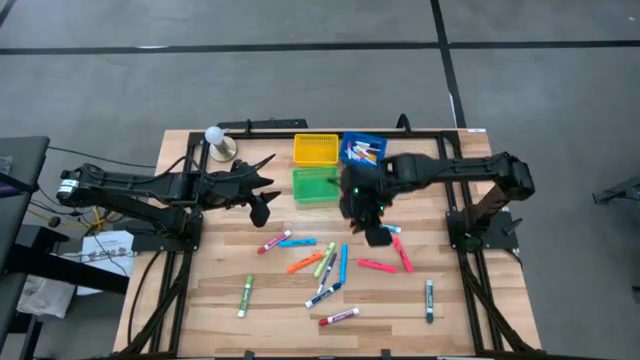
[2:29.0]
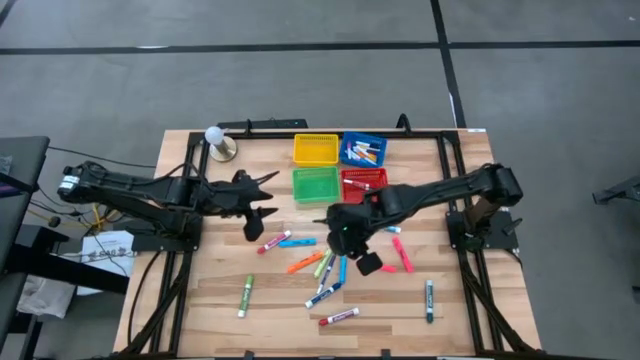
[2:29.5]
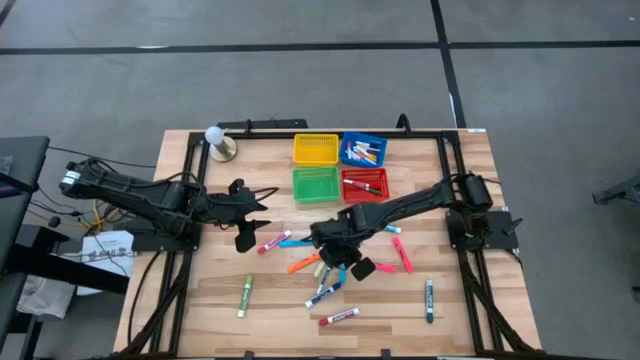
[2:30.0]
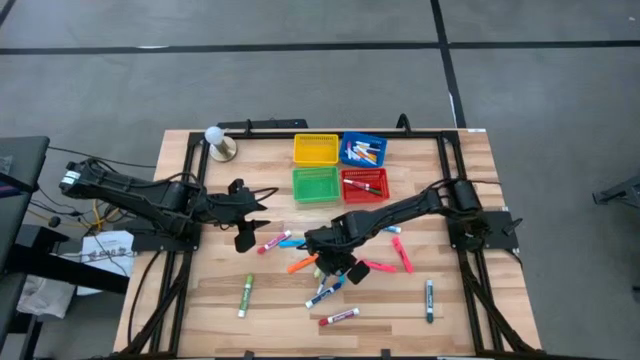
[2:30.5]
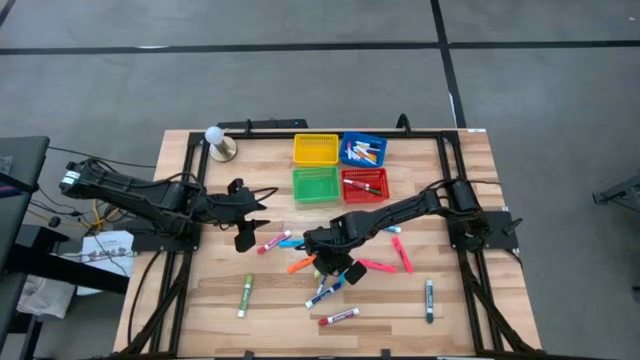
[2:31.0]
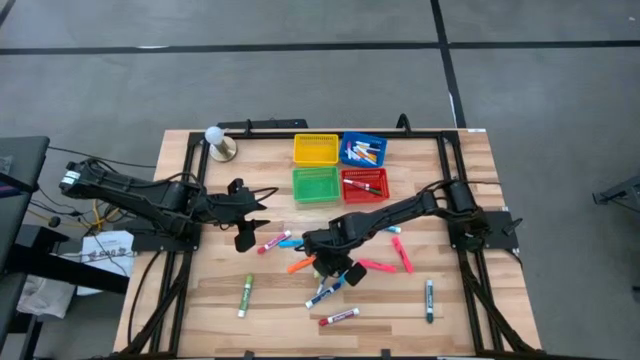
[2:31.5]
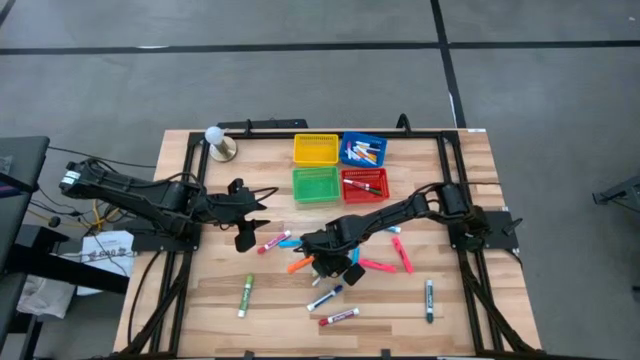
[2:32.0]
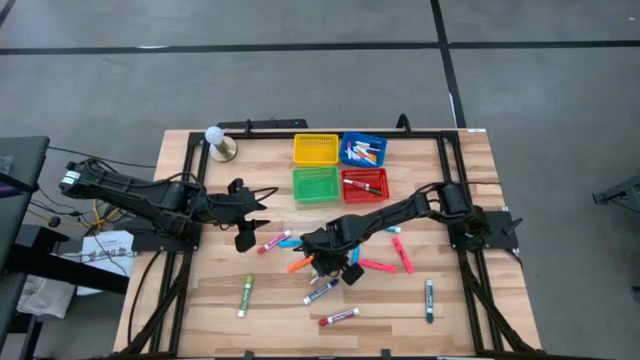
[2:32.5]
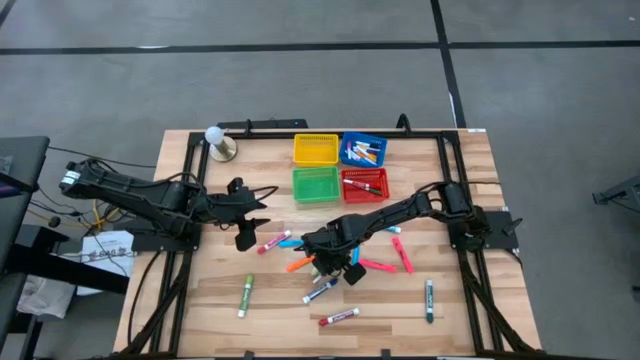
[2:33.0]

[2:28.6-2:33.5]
Task: Pick & Place Markers
Put the blue thin dry erase marker into the red bin

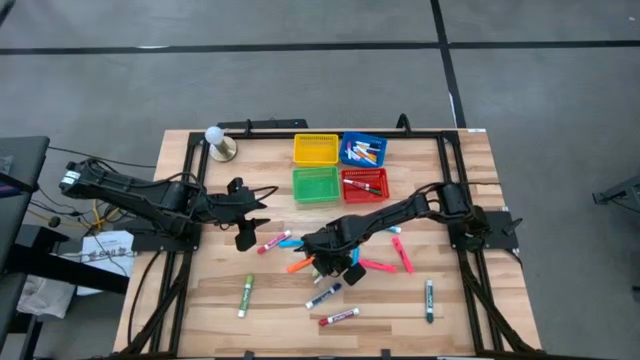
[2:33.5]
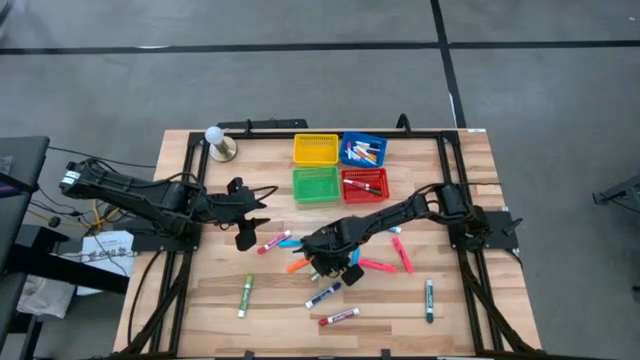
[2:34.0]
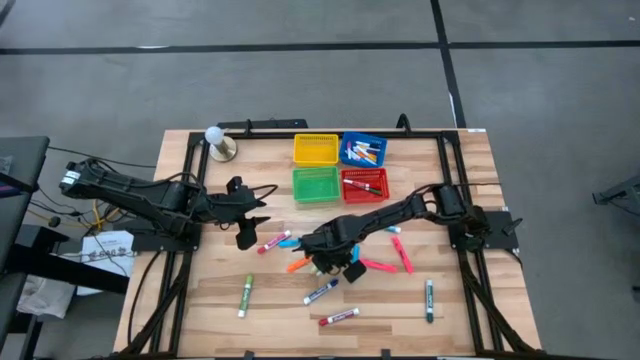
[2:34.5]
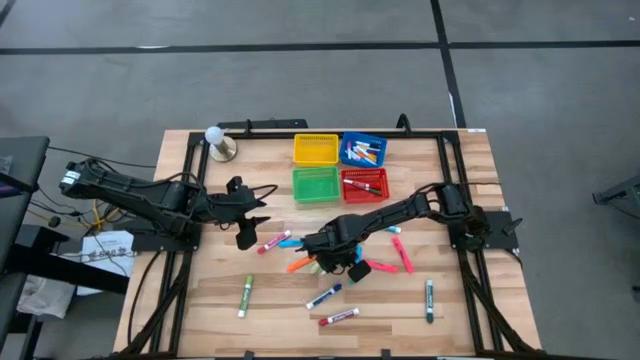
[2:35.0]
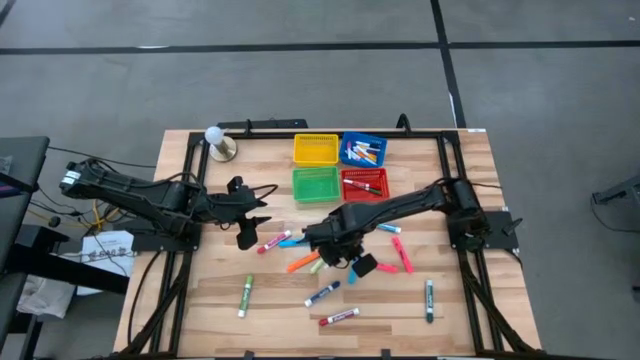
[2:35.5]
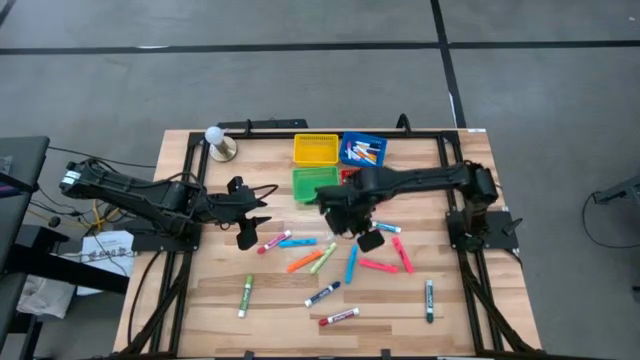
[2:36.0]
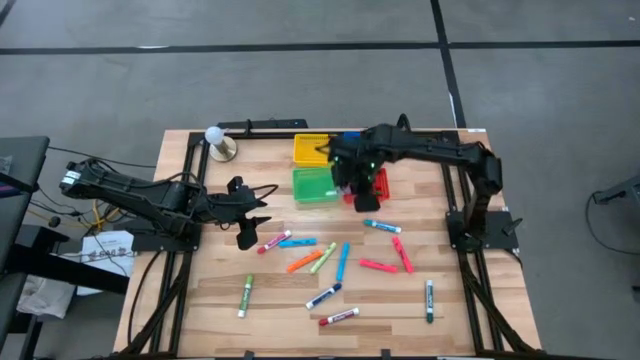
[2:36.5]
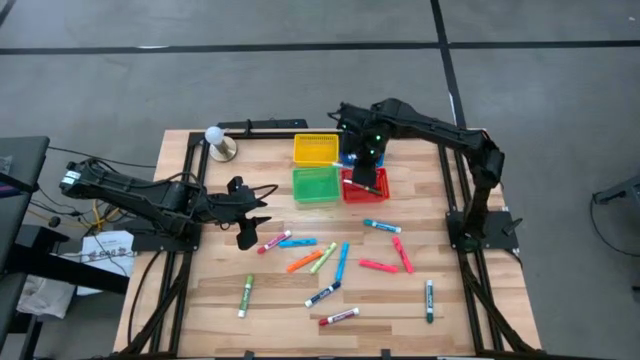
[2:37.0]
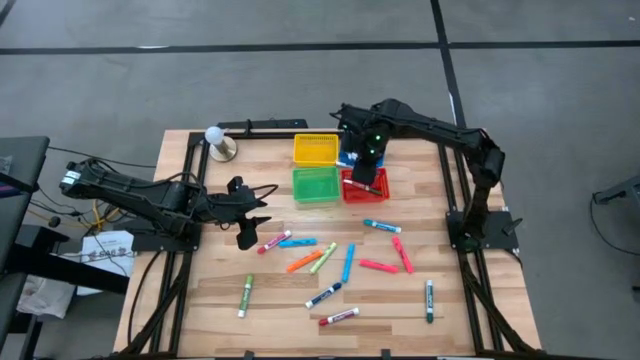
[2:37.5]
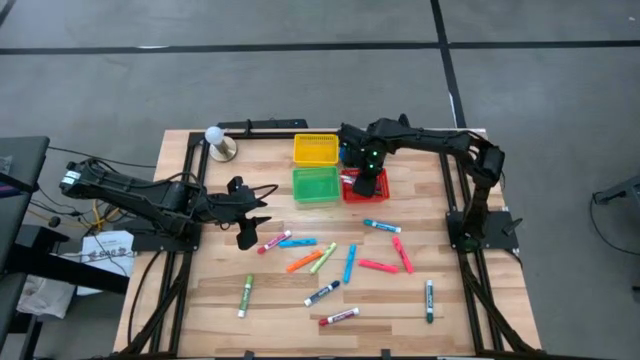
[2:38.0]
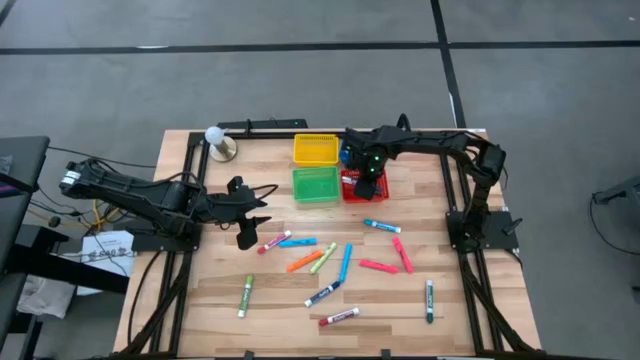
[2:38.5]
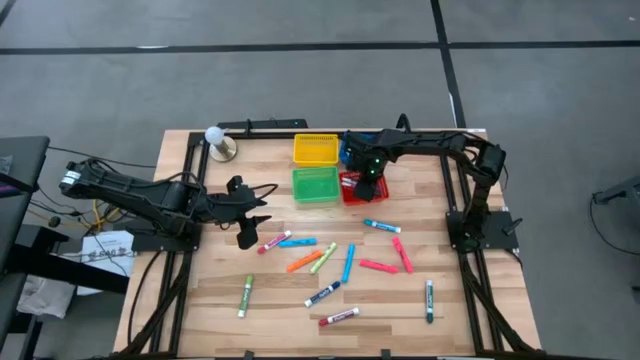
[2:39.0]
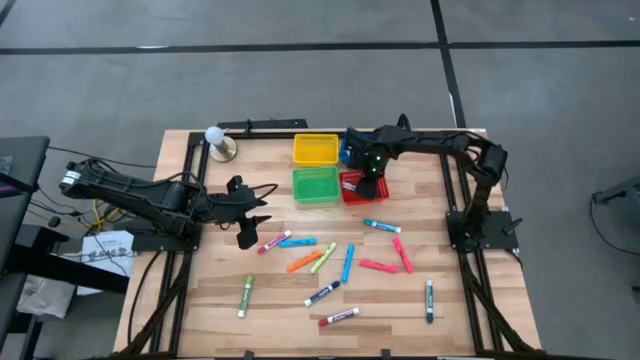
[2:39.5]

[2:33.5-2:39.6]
Put the blue thin dry erase marker into the red bin

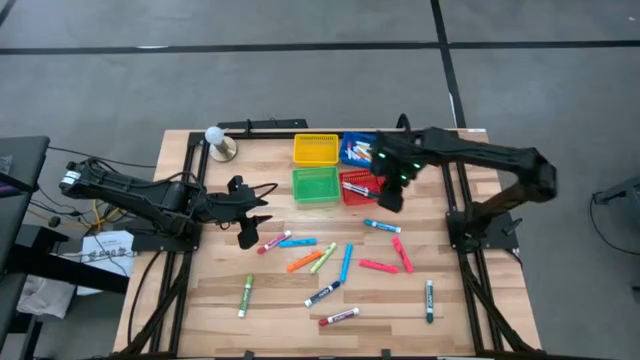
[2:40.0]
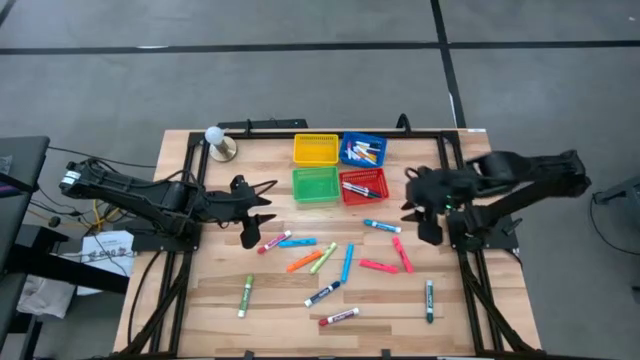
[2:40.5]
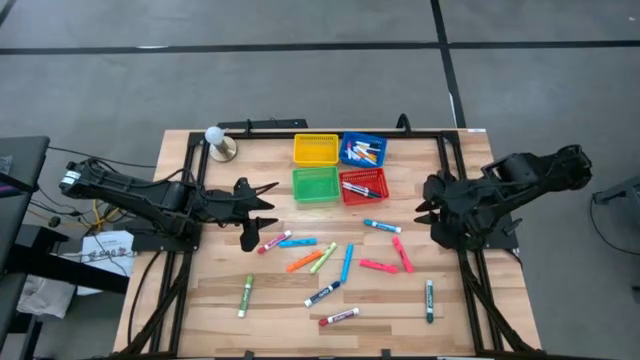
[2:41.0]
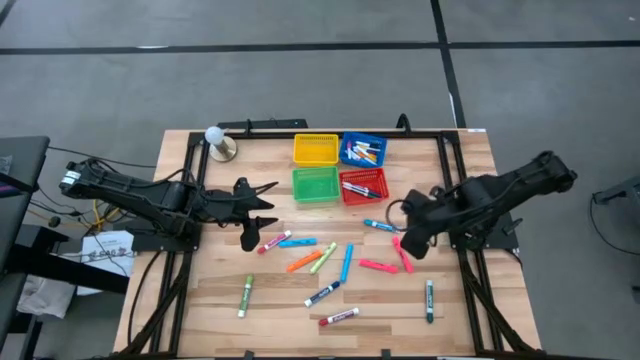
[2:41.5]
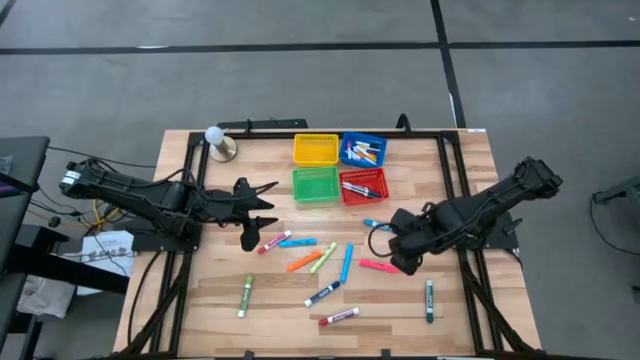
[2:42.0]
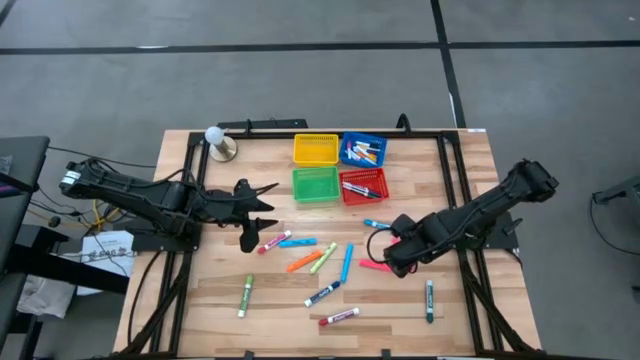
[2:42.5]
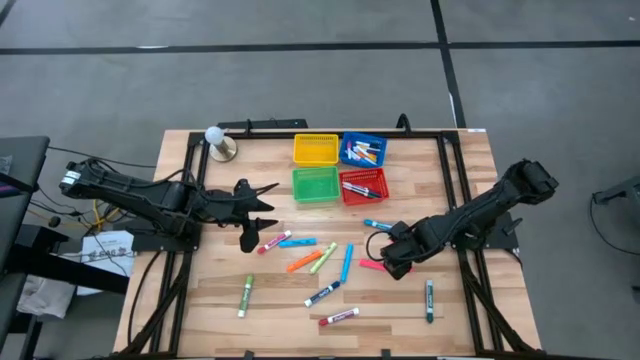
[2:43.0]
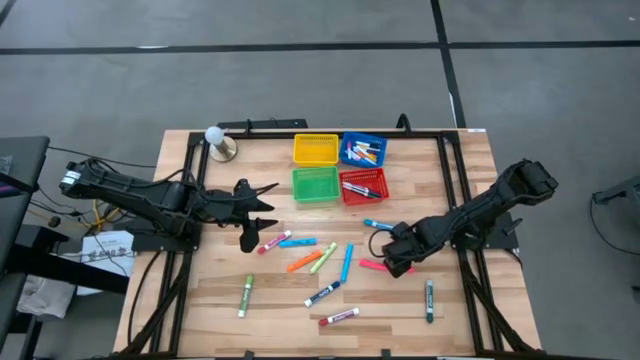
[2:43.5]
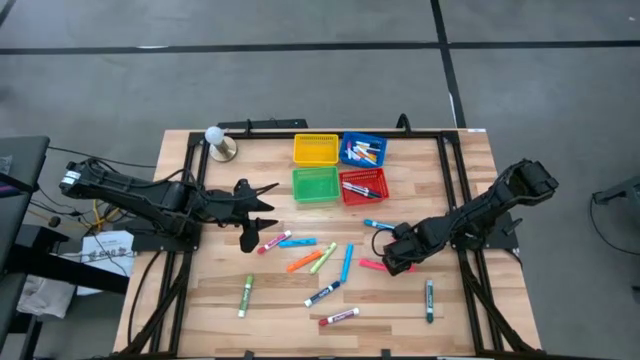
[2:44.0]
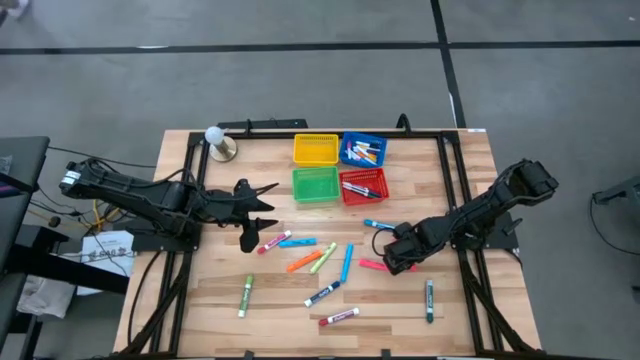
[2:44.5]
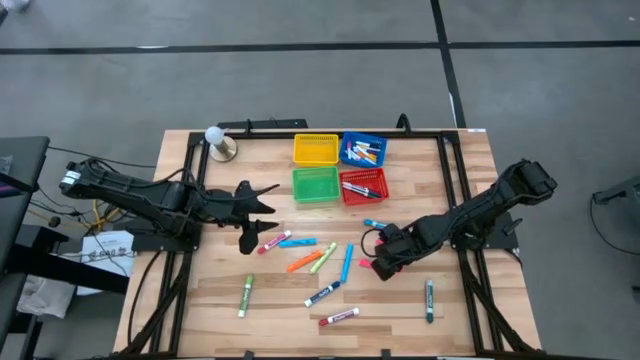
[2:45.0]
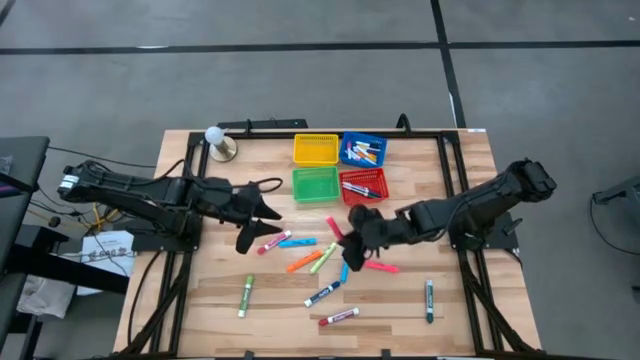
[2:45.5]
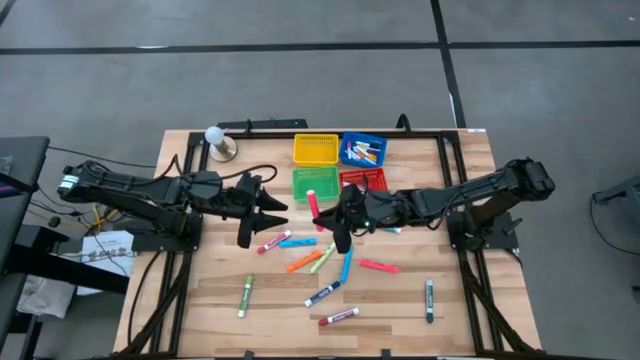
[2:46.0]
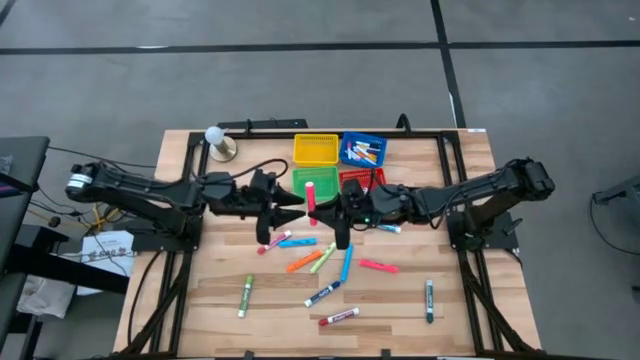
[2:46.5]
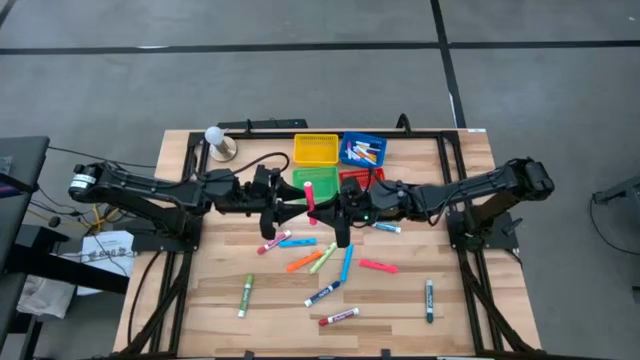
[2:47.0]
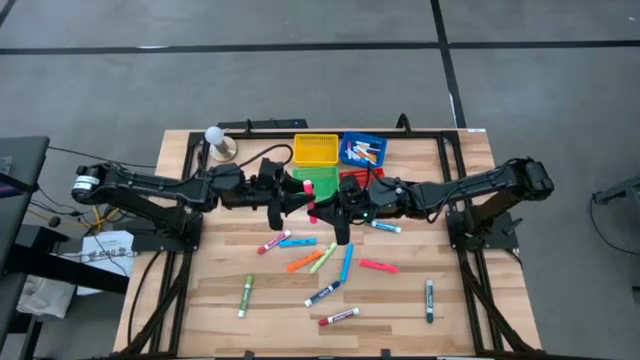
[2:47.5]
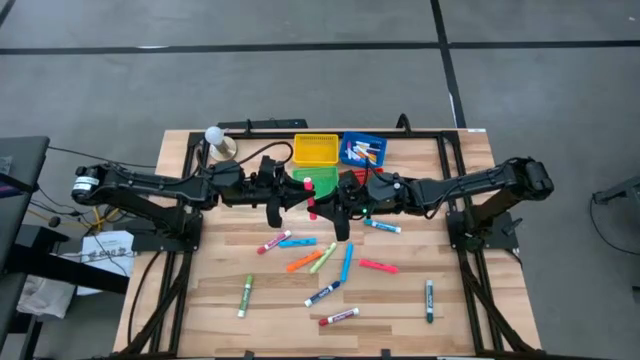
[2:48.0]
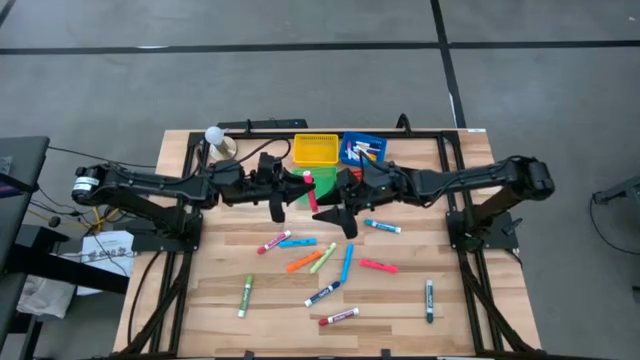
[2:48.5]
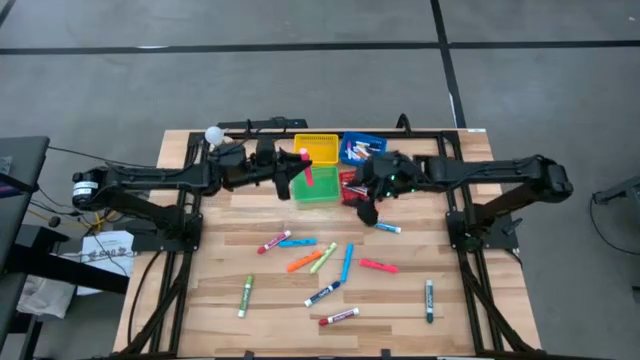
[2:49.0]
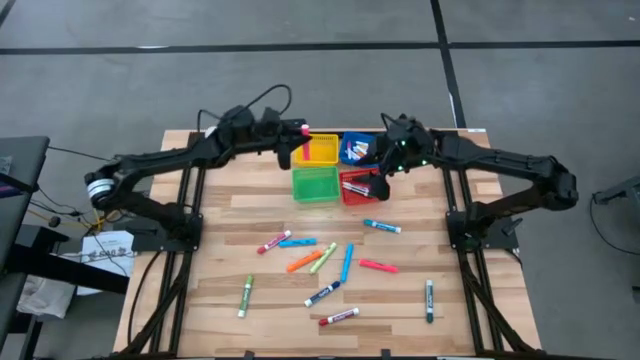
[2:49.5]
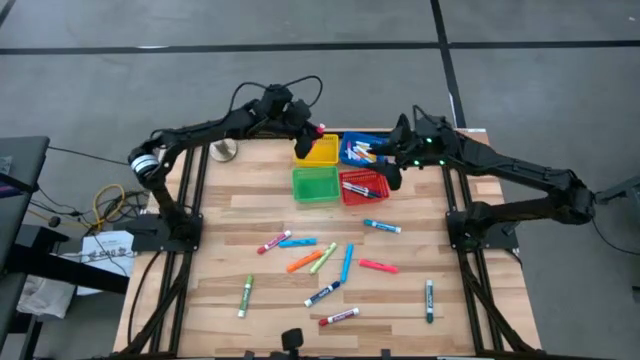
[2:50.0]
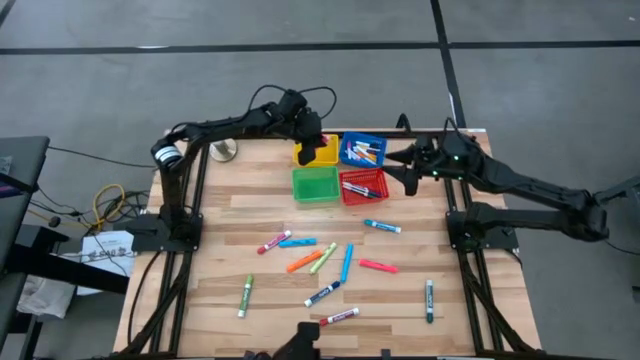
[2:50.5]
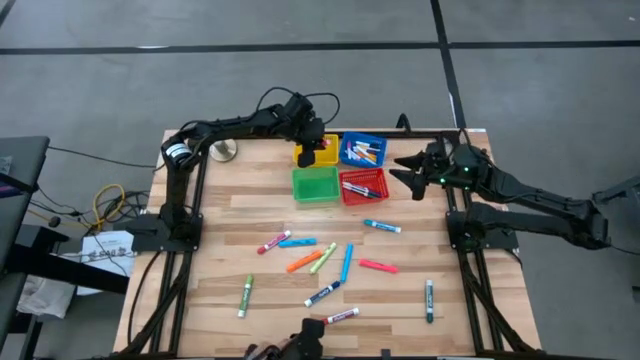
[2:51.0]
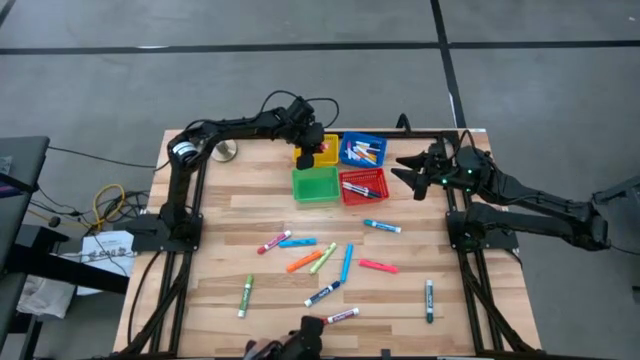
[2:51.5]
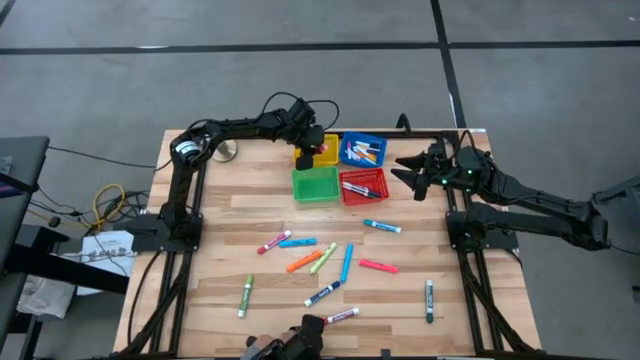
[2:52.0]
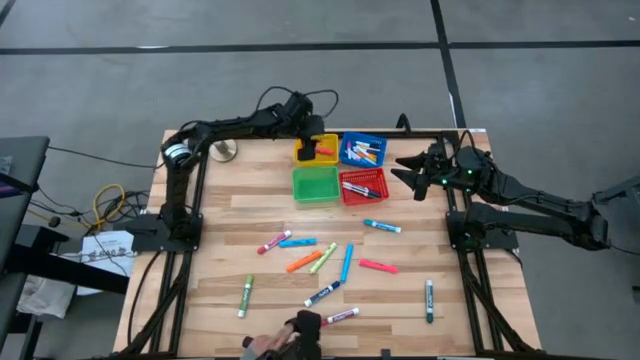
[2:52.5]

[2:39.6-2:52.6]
Put the pink highlighter into the yellow bin
